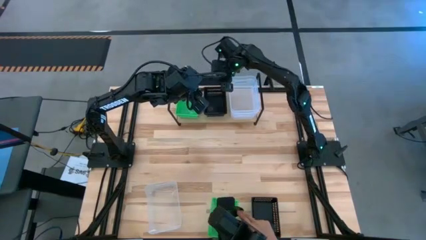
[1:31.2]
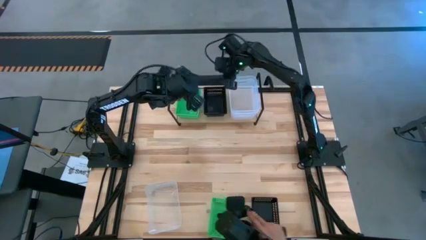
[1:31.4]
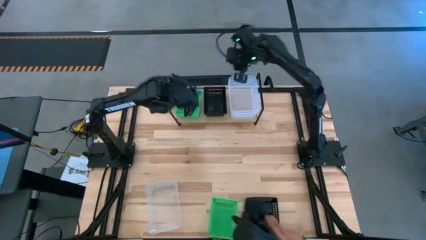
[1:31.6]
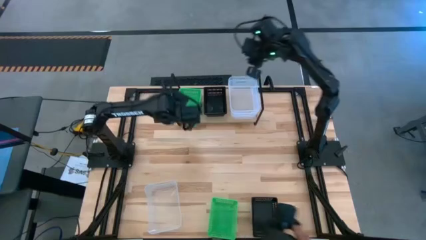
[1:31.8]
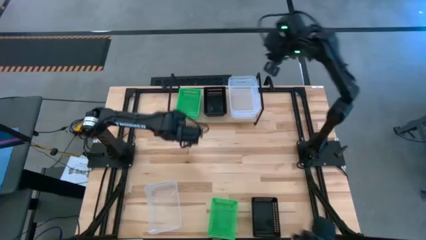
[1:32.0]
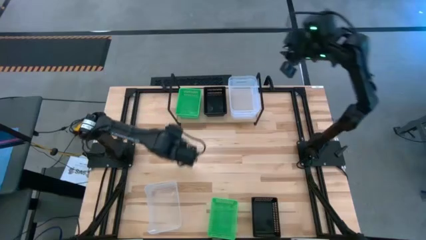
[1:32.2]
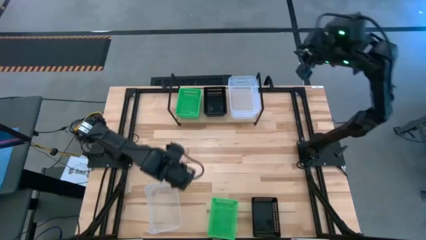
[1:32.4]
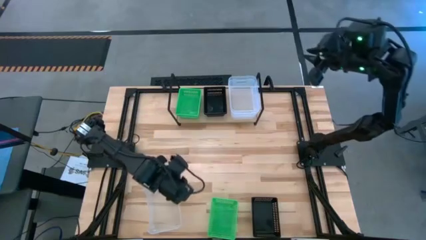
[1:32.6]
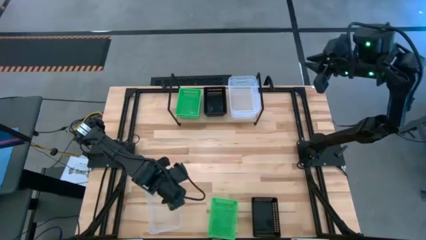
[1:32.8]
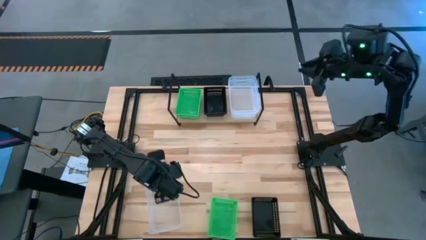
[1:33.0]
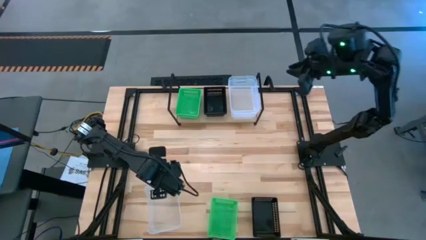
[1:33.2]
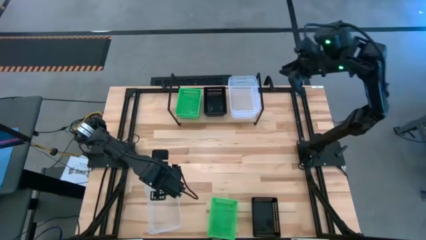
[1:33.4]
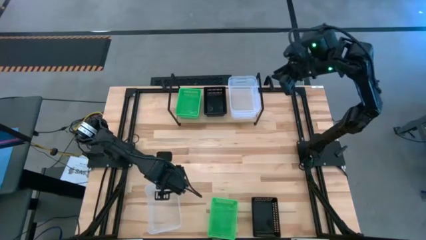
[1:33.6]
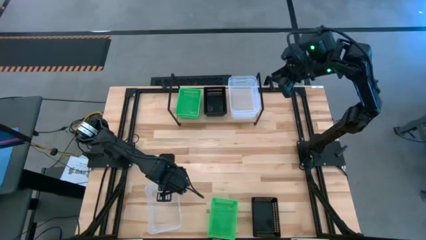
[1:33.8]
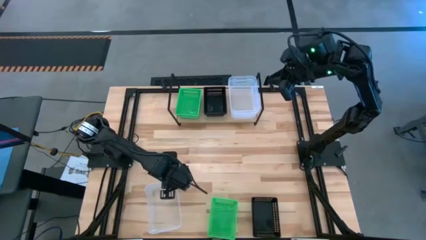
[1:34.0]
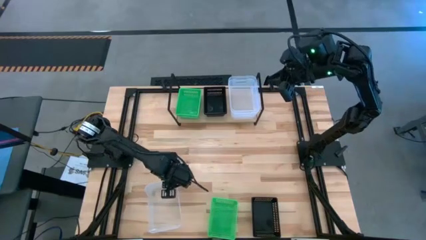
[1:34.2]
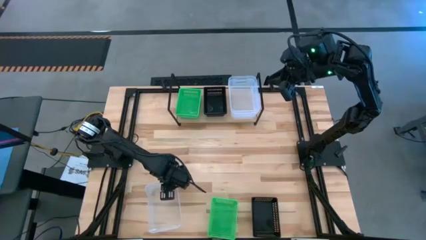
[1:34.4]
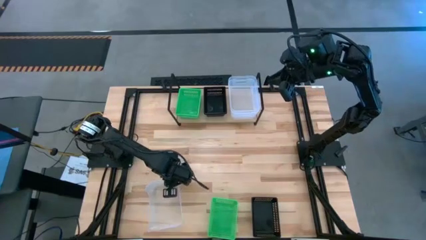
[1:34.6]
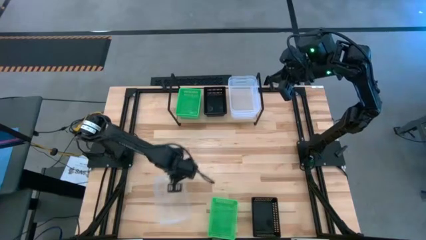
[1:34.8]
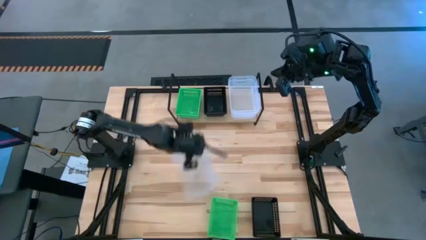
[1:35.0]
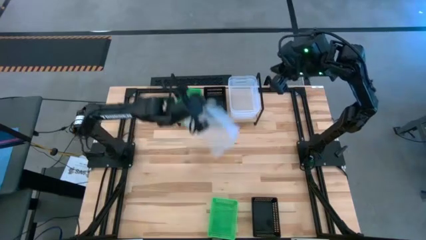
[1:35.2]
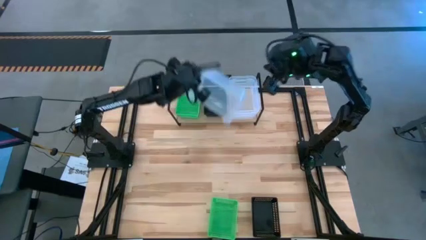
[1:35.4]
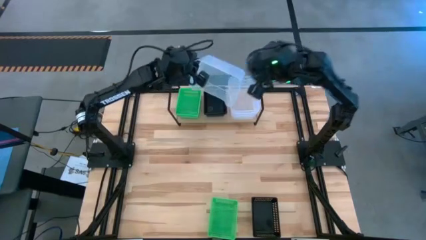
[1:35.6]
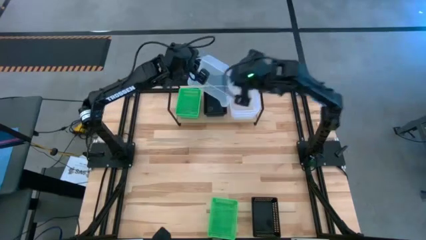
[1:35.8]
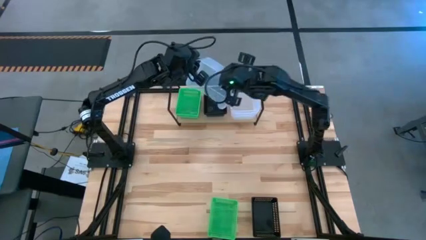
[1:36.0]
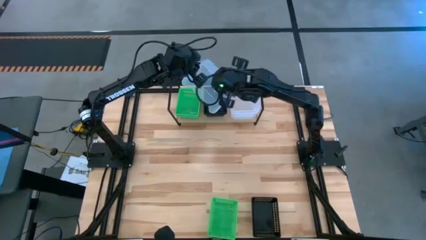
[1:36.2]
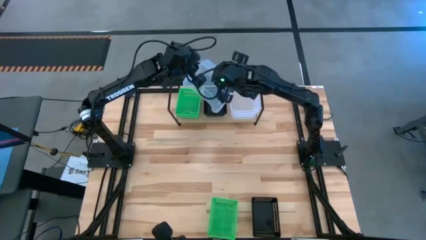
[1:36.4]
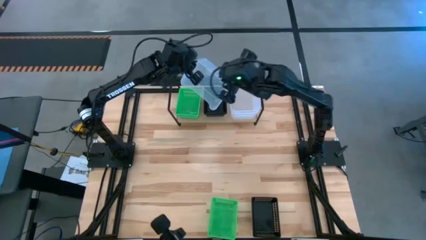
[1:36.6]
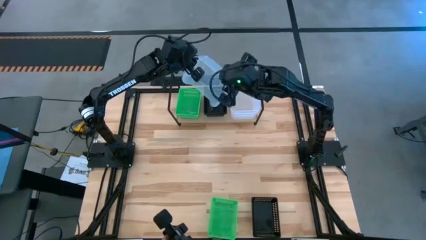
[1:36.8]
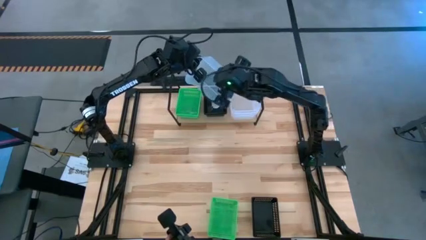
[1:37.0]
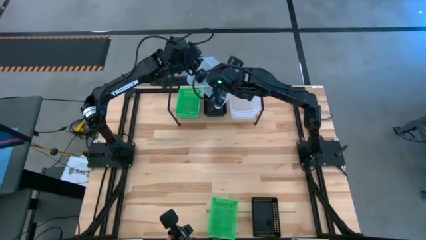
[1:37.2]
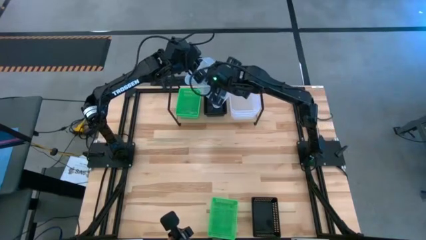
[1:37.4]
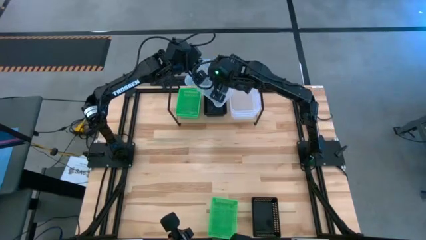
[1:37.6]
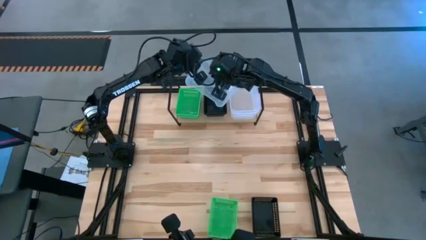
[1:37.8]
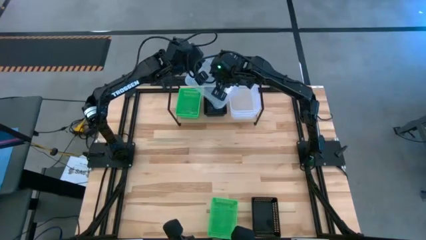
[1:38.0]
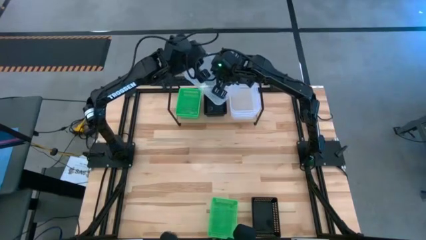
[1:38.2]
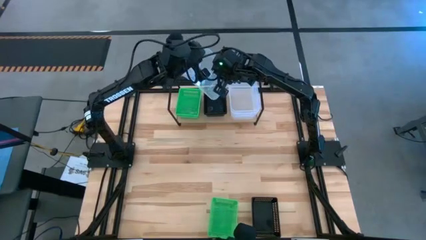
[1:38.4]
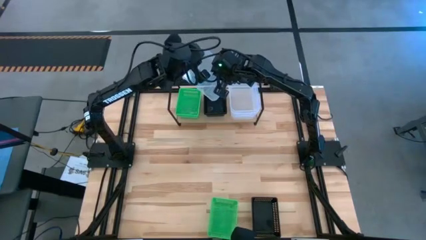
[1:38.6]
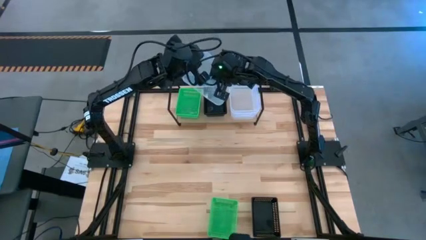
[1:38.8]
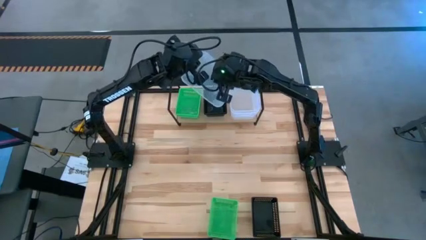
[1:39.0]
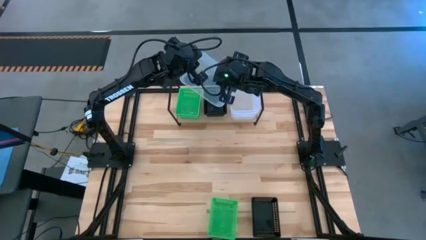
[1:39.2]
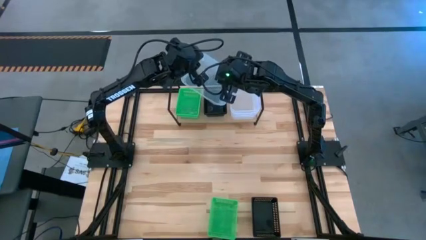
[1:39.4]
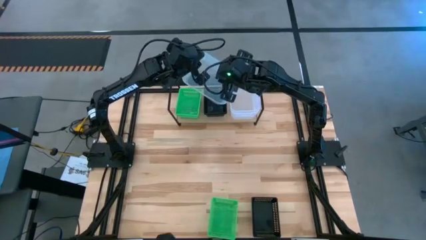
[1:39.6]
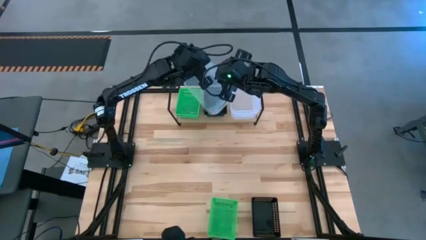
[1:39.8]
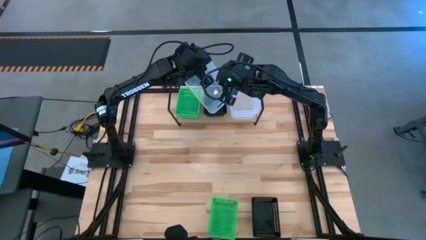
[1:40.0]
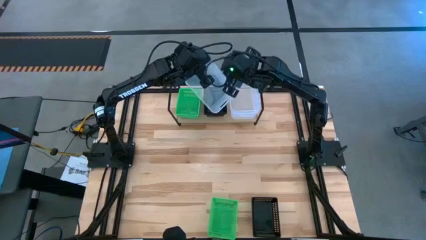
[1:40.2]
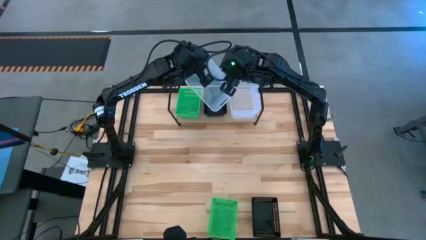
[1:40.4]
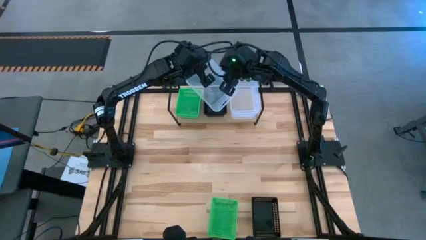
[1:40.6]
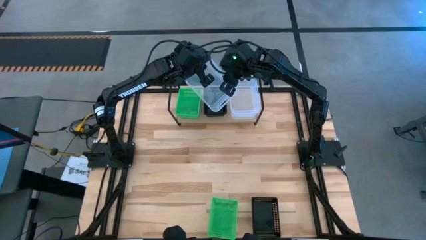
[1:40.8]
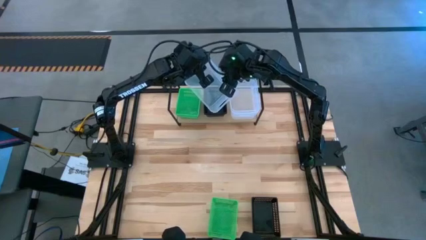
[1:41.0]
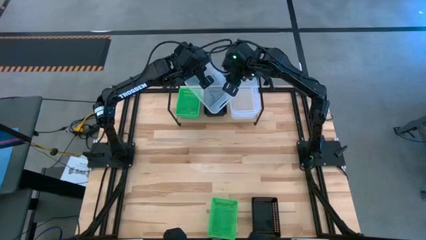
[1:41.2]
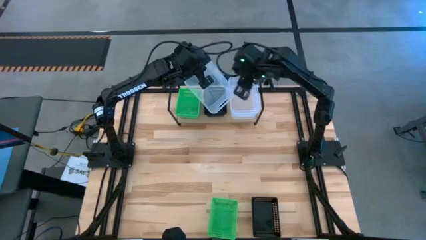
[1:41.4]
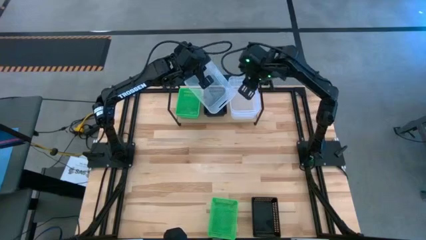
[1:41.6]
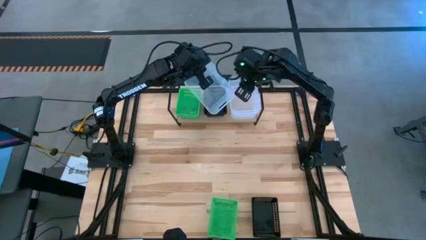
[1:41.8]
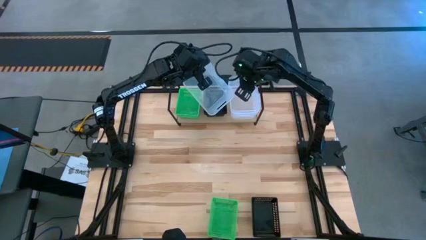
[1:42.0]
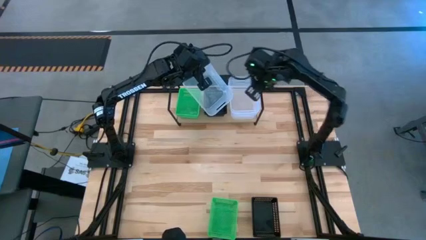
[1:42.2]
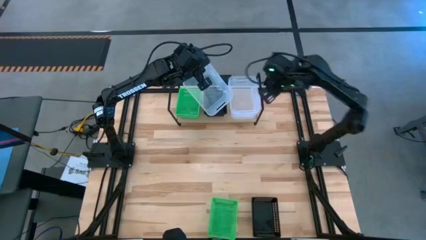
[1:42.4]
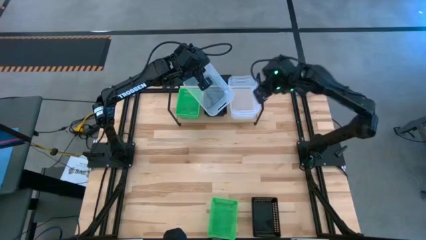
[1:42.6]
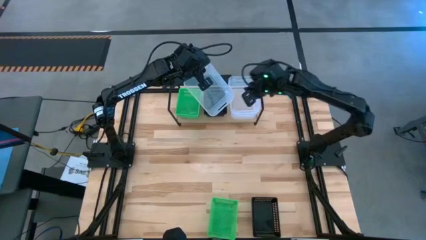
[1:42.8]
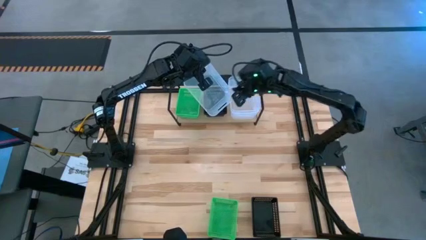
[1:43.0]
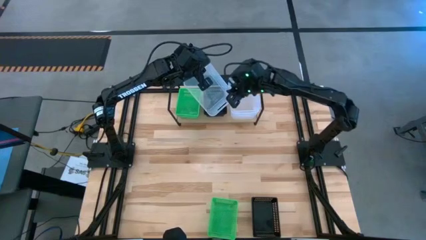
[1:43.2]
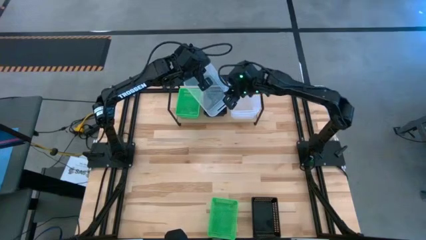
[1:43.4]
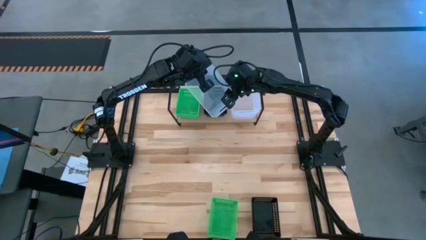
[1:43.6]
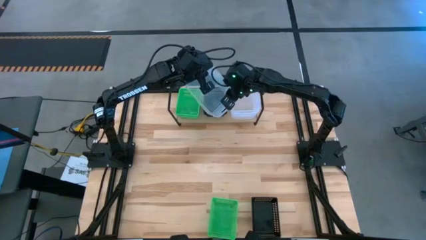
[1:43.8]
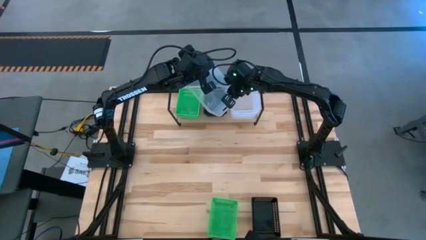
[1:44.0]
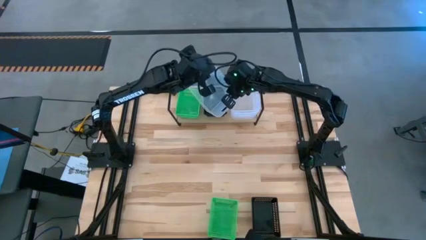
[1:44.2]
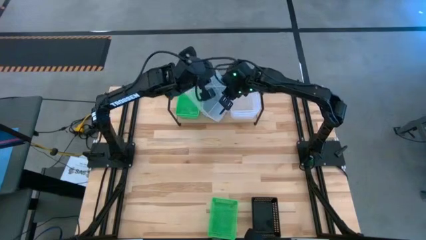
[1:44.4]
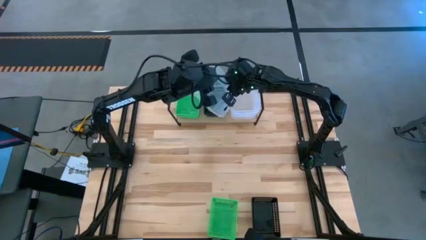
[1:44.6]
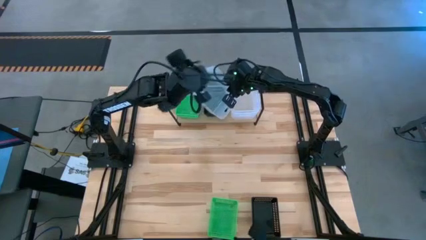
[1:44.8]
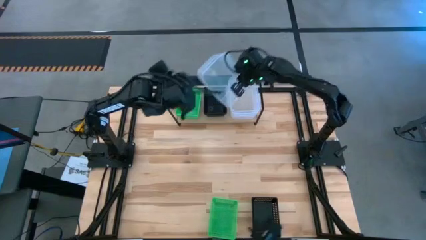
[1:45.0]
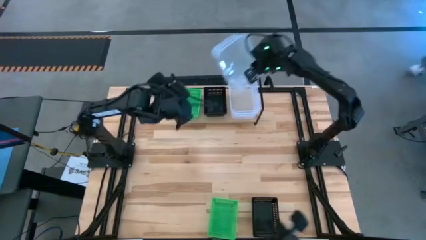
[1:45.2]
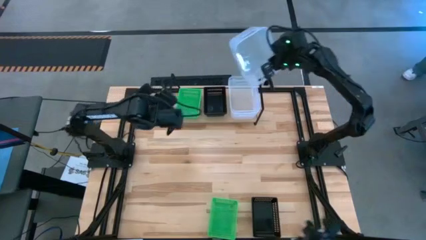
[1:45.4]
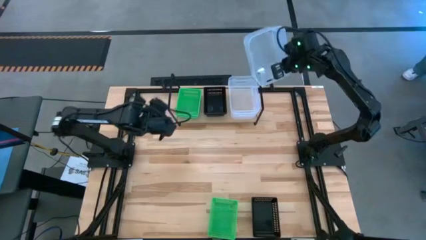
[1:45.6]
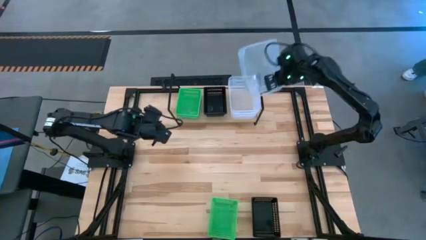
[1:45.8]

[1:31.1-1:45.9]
Task: Stack baskets on shelf by color
Stack the transparent bin into the transparent bin on the shelf
